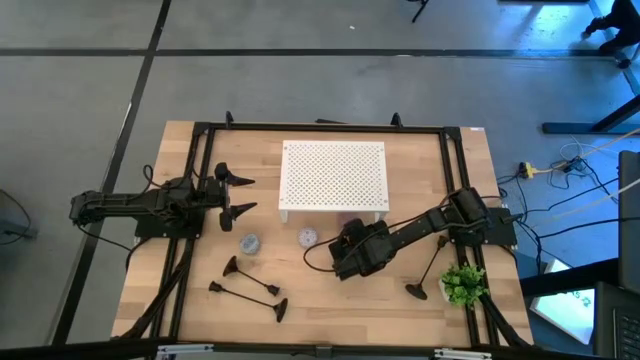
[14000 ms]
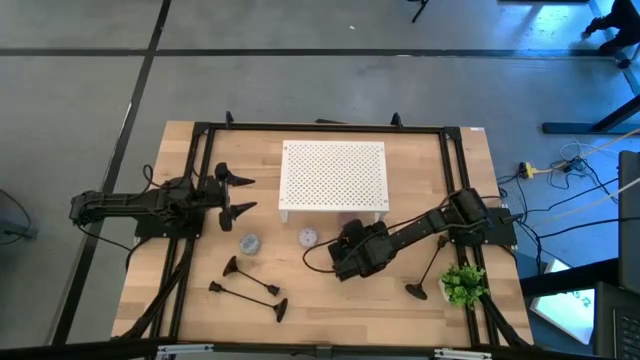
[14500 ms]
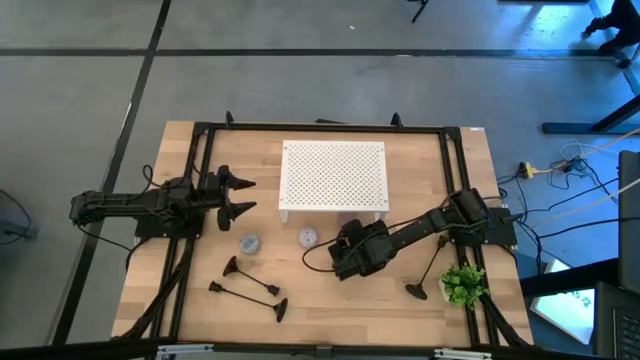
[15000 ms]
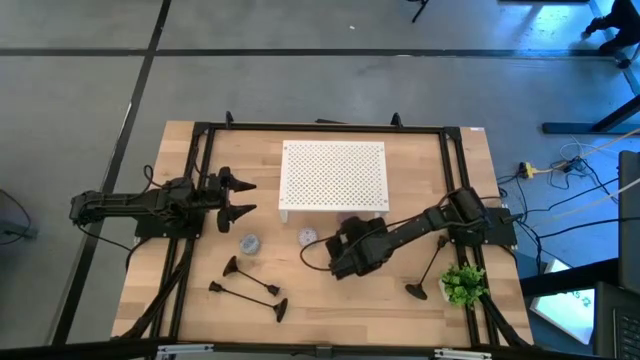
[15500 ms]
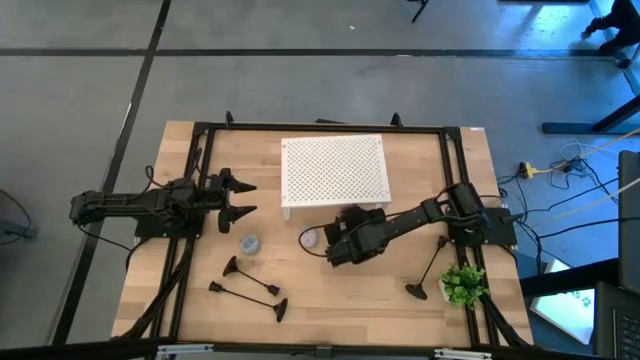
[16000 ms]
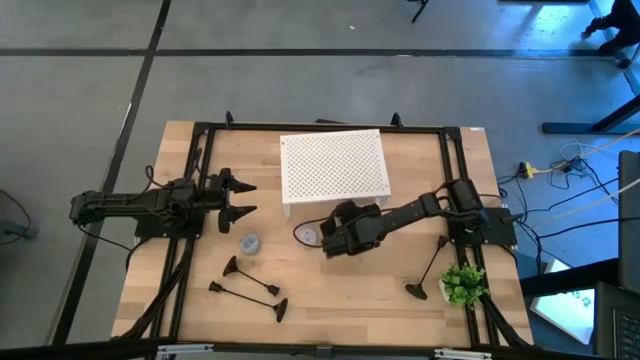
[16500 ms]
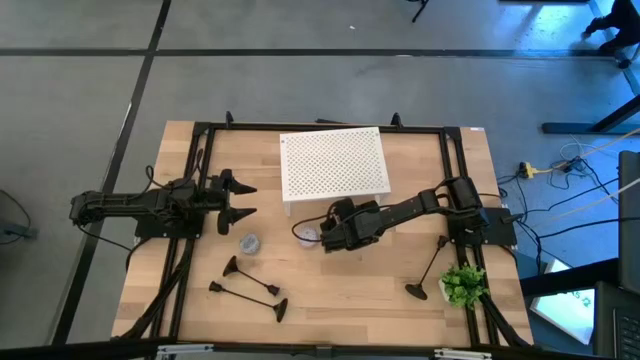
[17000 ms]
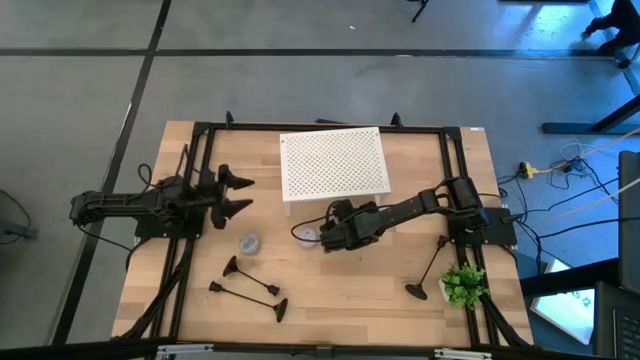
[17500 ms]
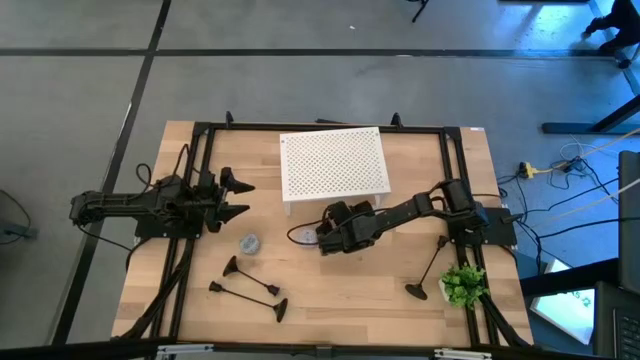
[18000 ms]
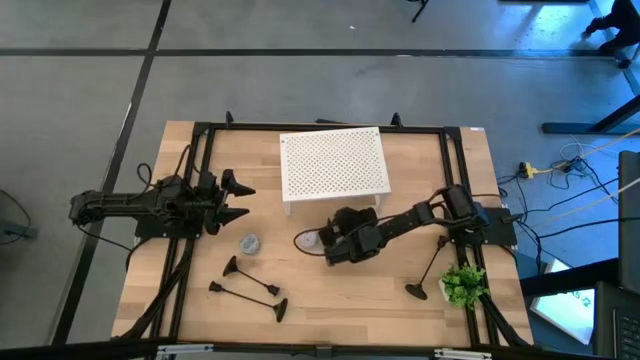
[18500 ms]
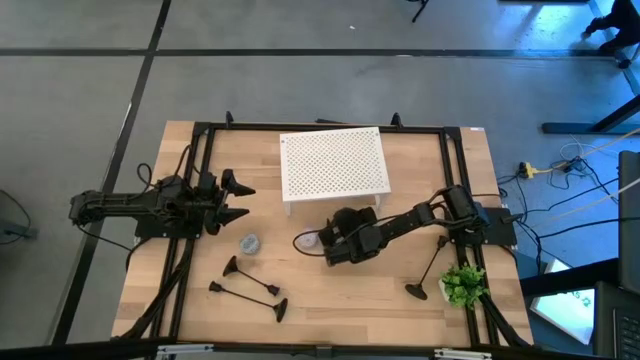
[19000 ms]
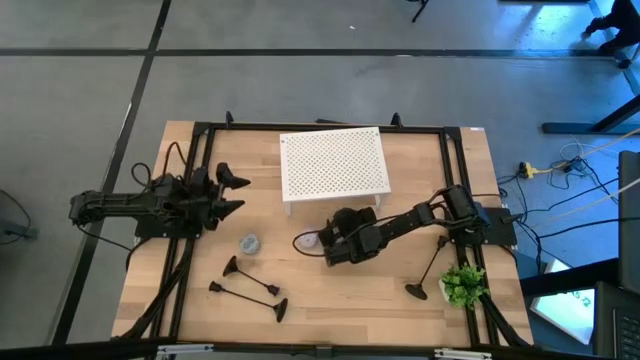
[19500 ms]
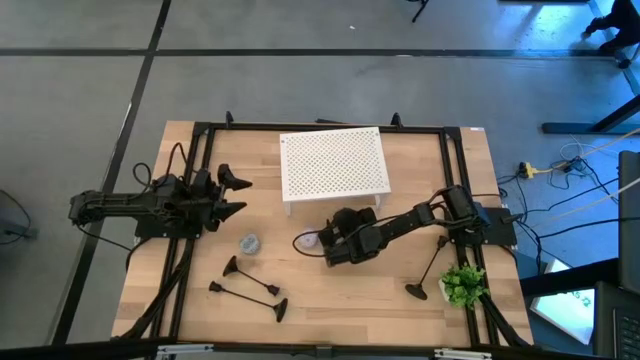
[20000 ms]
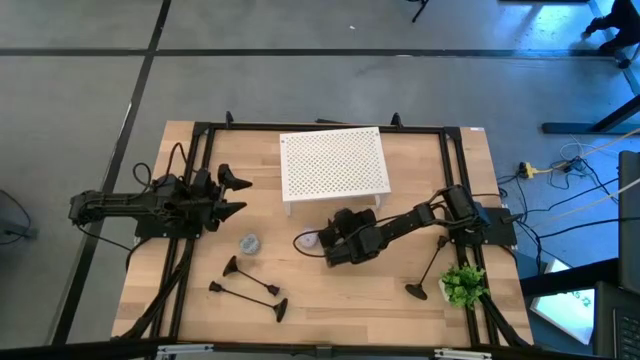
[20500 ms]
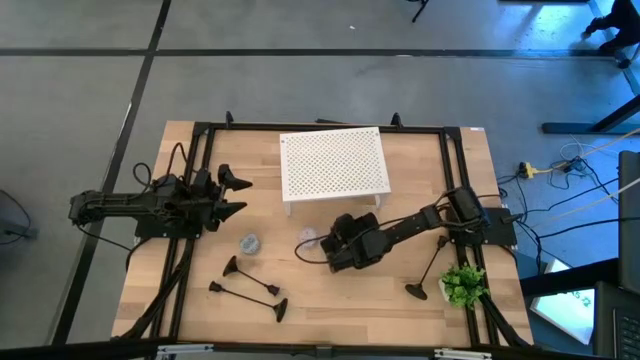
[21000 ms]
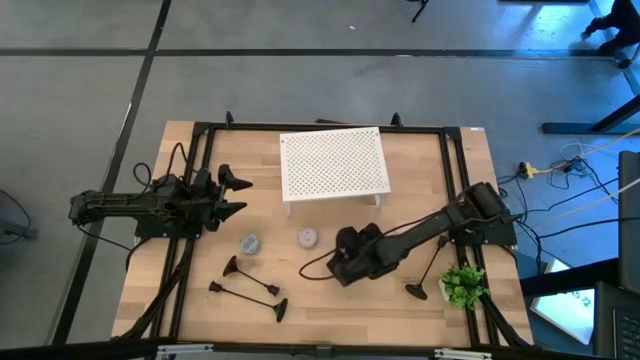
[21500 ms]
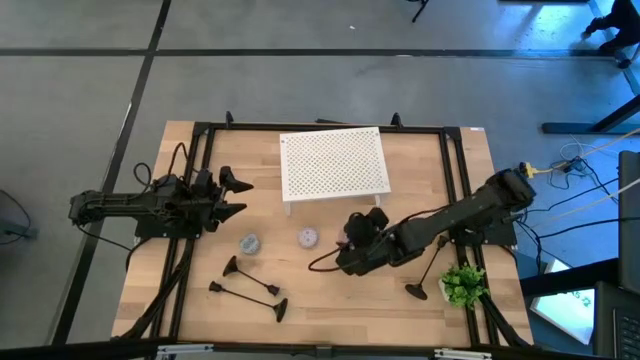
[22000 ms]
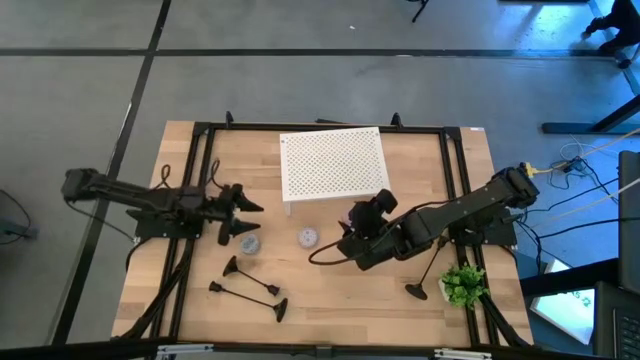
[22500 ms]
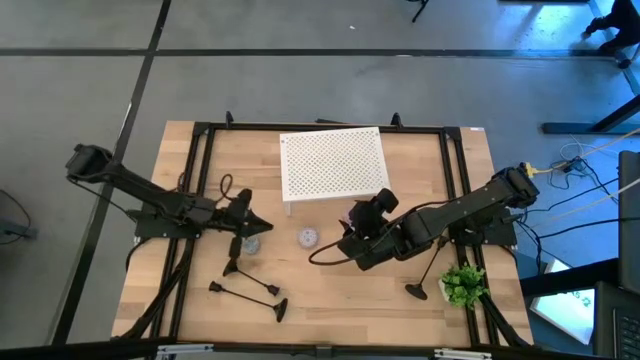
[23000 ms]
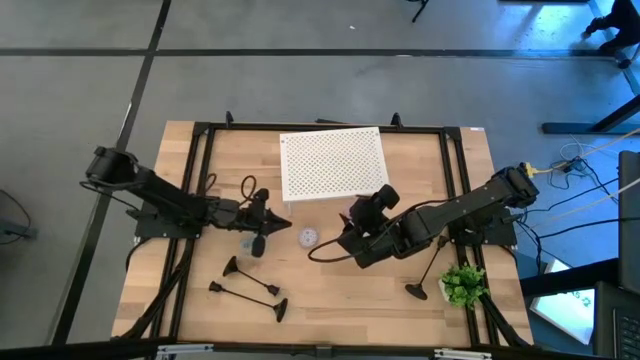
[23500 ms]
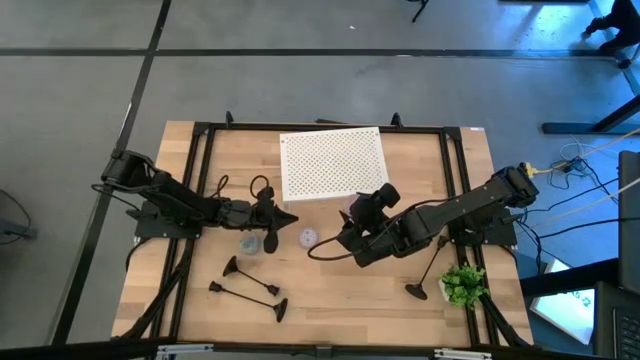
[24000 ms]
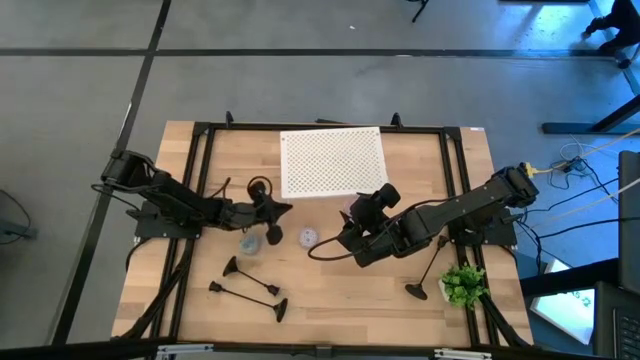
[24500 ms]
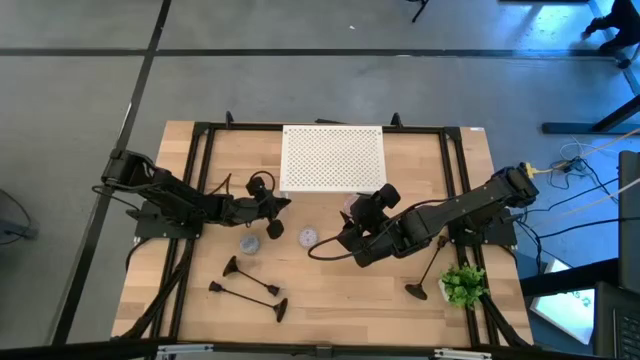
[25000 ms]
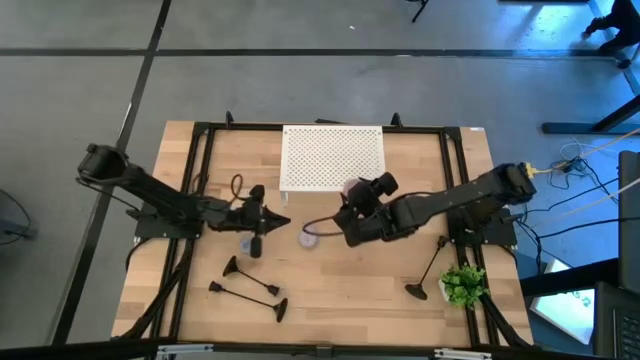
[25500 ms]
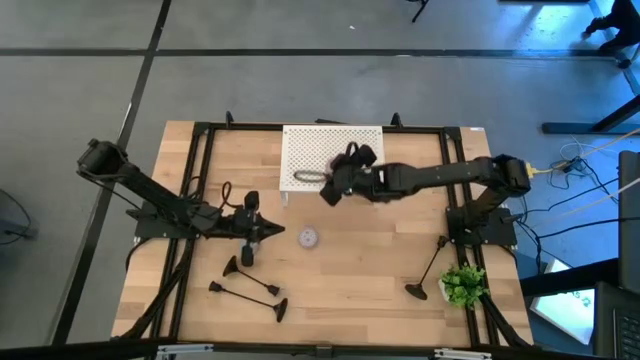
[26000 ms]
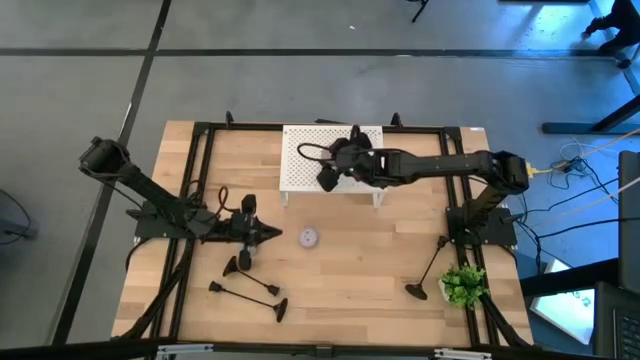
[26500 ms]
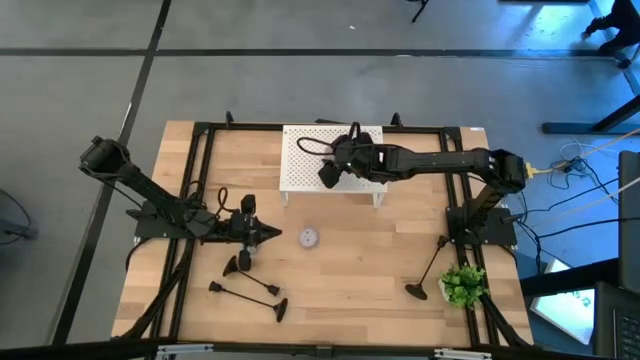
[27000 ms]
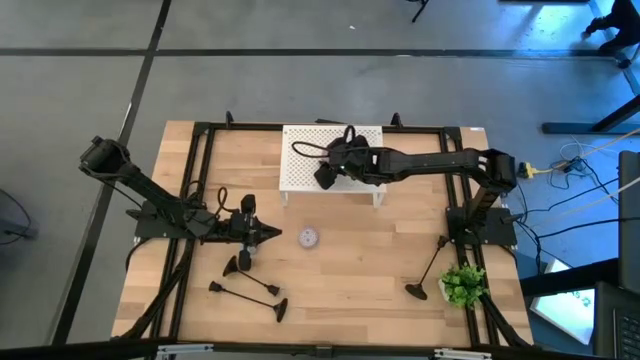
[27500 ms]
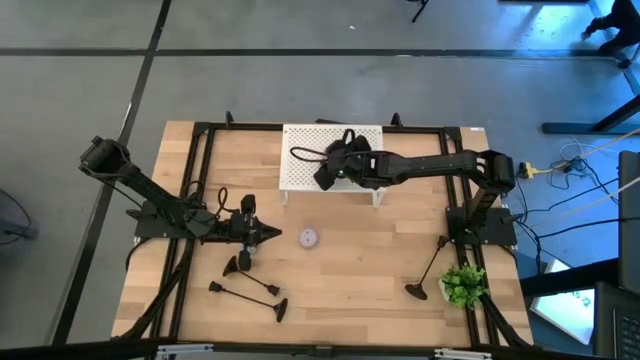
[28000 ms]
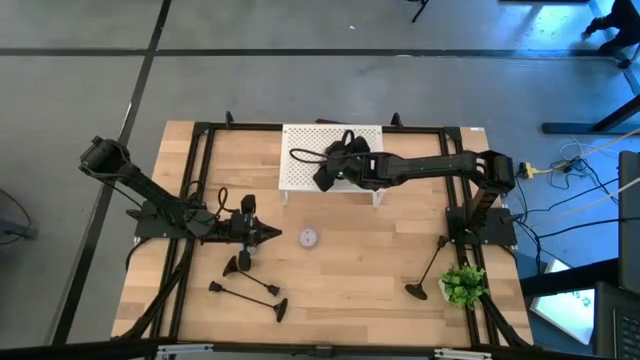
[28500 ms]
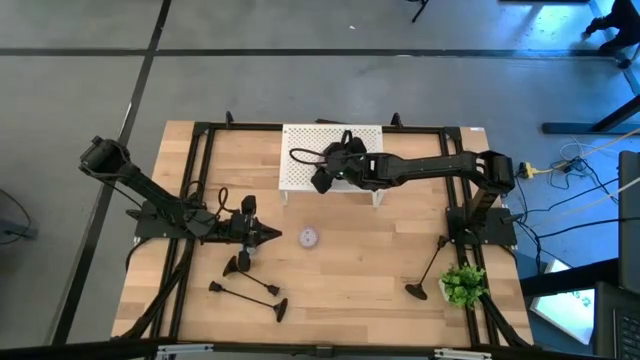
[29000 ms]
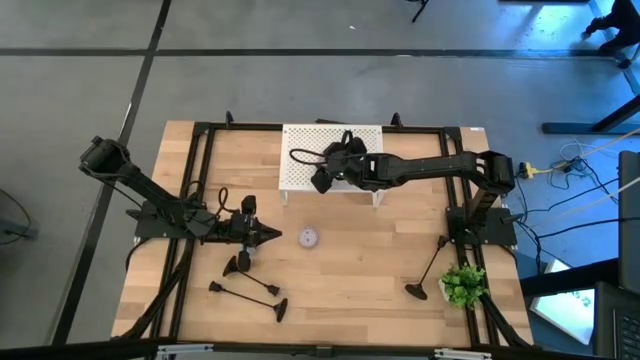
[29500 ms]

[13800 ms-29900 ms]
Task: Pick & Place candle stick holders
Put the pink scented candle on the shelf

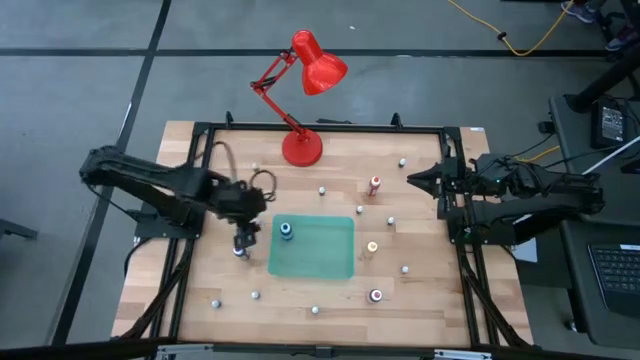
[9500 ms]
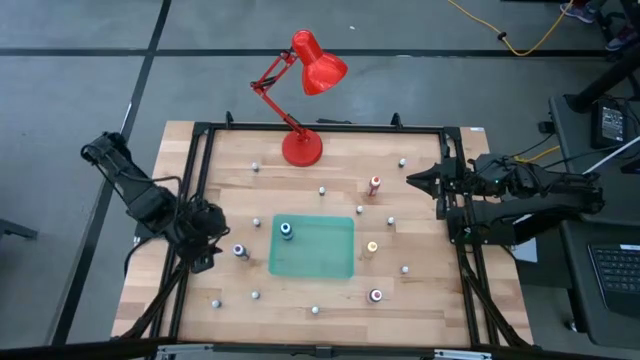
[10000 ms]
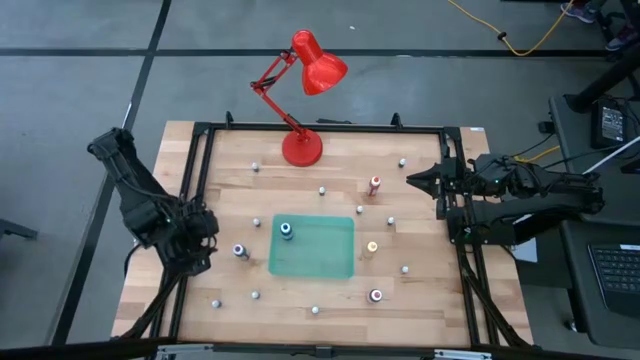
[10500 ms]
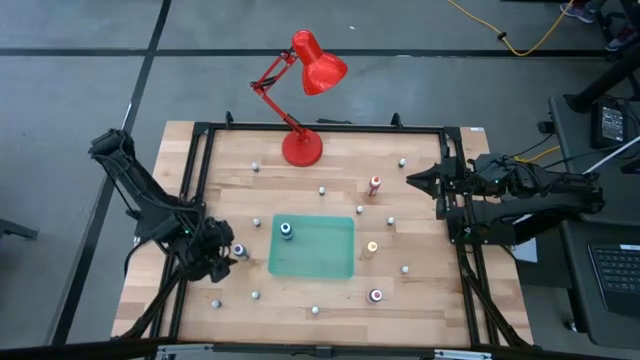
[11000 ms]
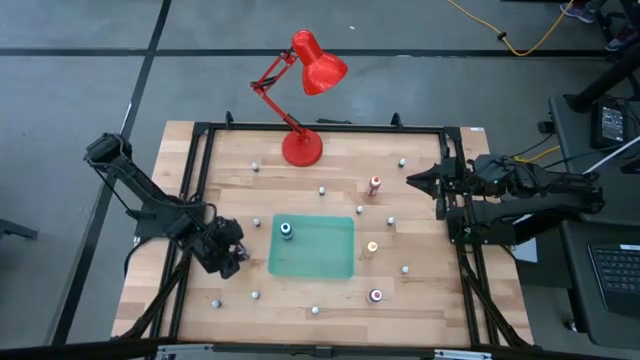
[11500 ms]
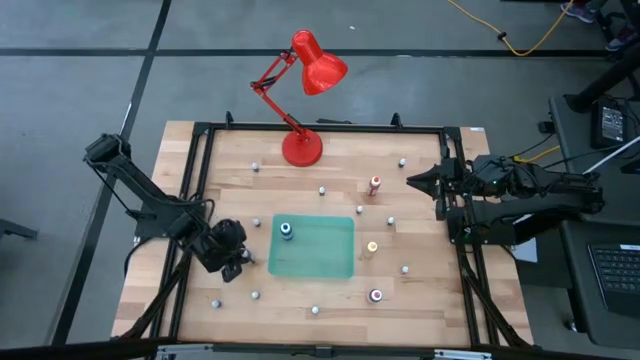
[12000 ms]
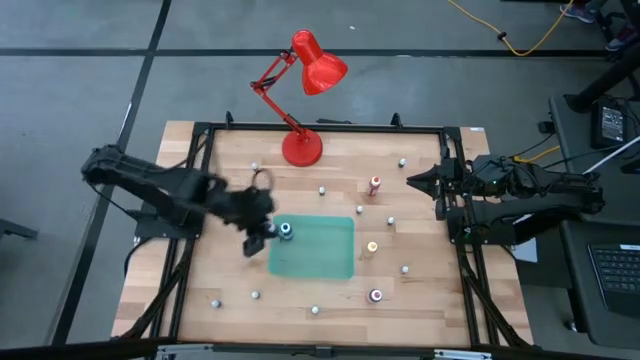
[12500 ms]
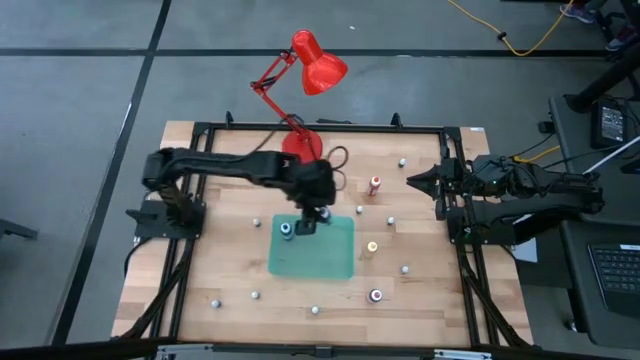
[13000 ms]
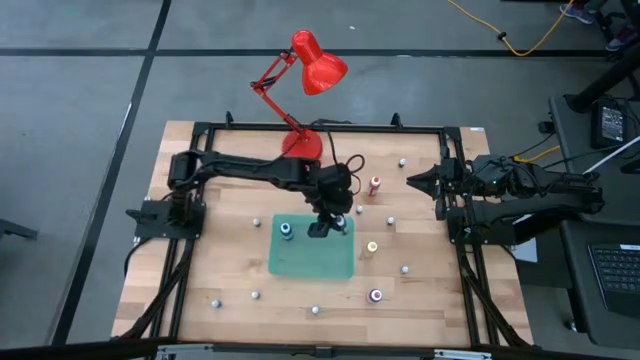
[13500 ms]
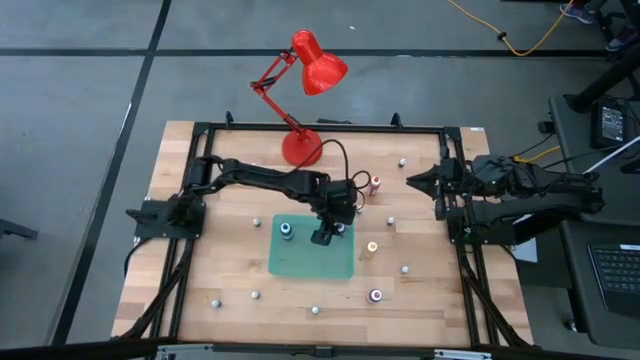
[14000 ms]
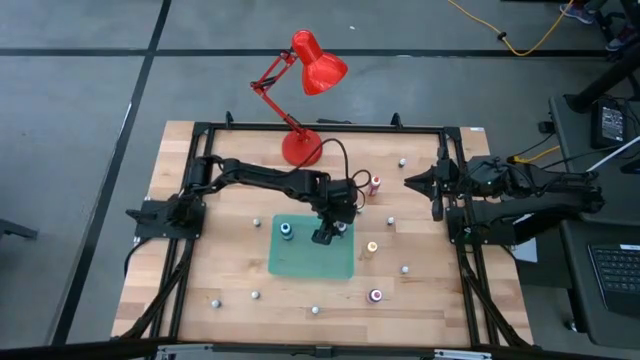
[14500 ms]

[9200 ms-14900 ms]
Task: Pick & Place food coloring
Put the large purple bottle into the green bin
